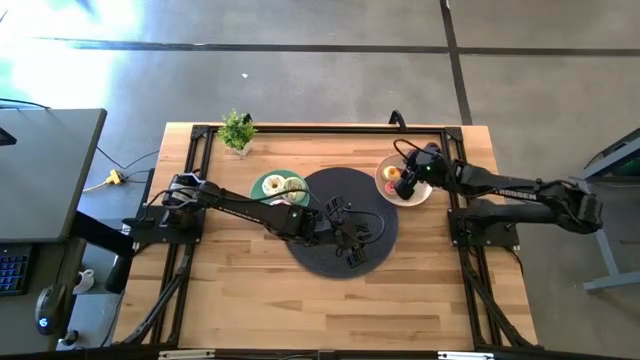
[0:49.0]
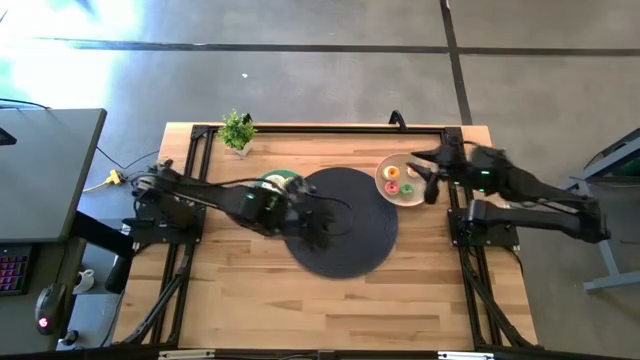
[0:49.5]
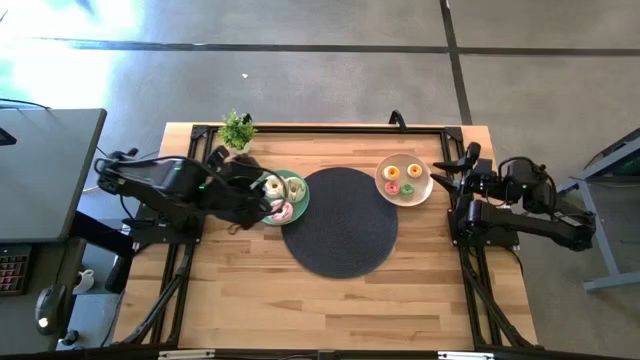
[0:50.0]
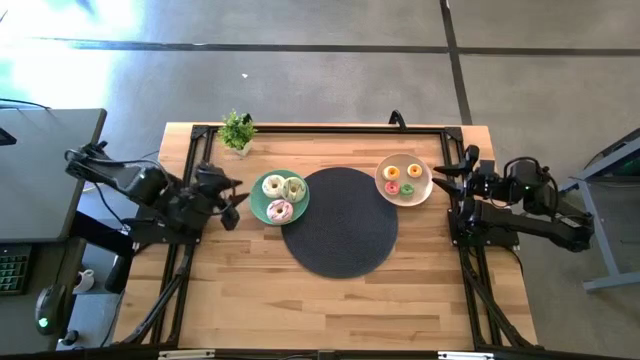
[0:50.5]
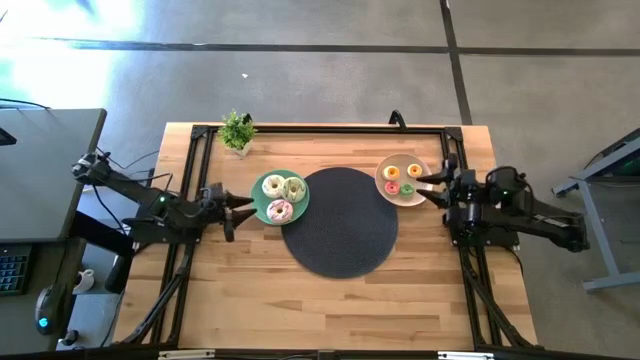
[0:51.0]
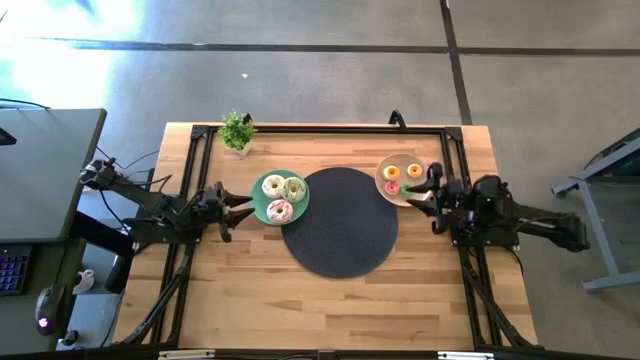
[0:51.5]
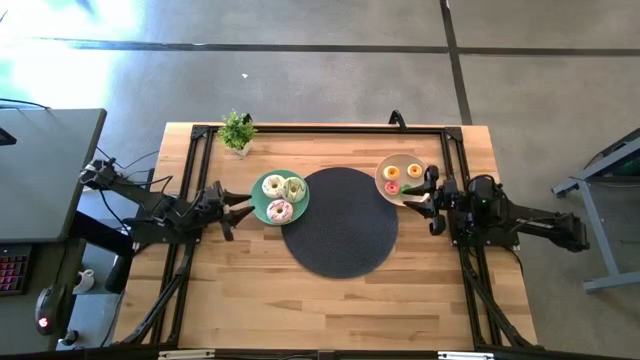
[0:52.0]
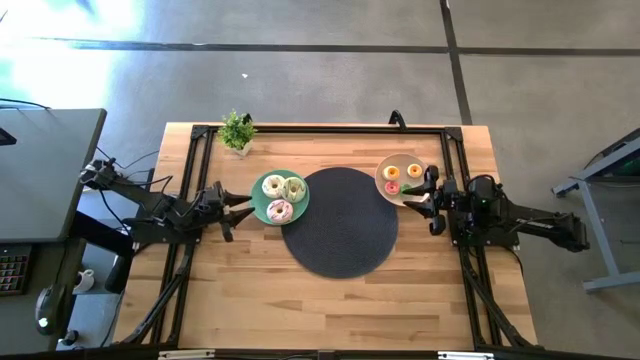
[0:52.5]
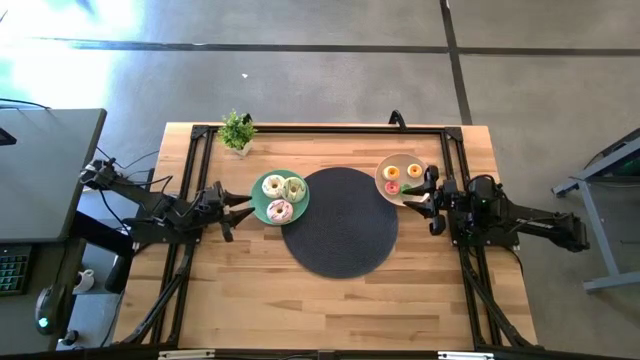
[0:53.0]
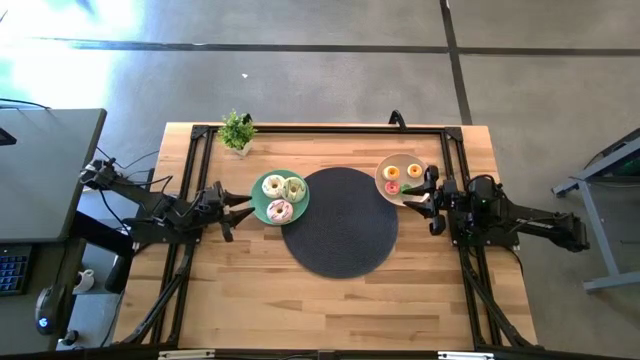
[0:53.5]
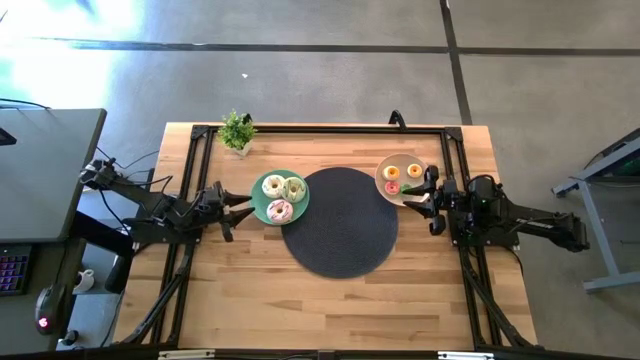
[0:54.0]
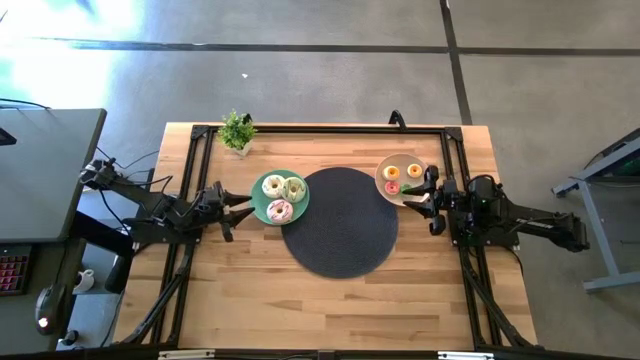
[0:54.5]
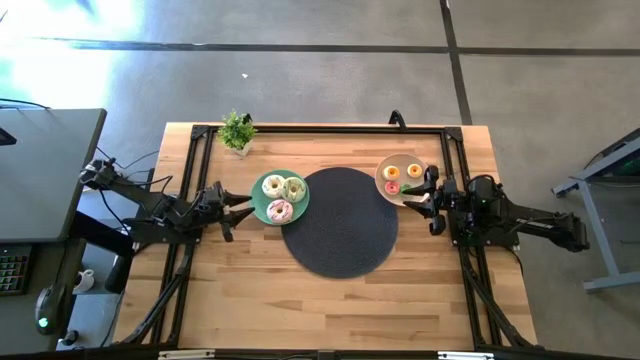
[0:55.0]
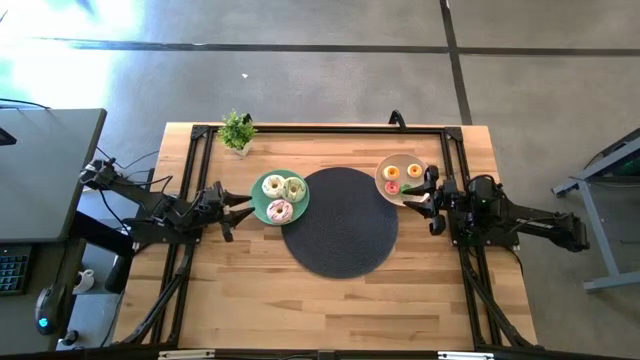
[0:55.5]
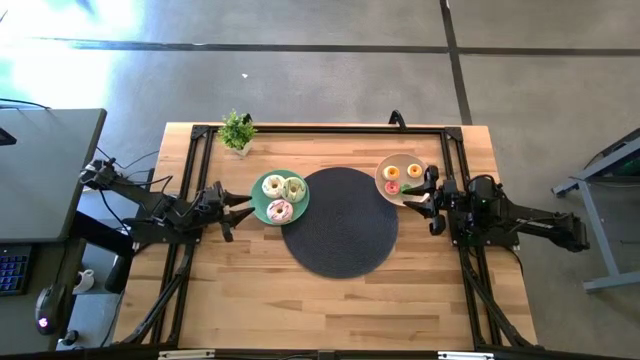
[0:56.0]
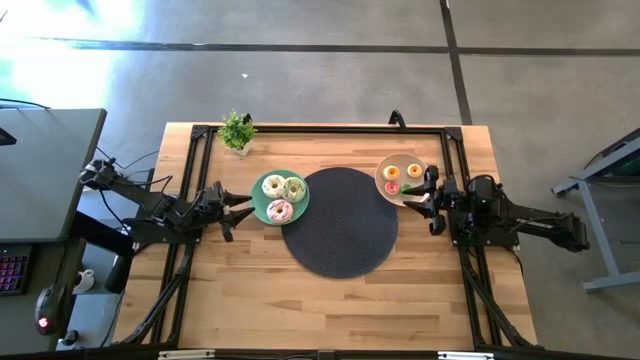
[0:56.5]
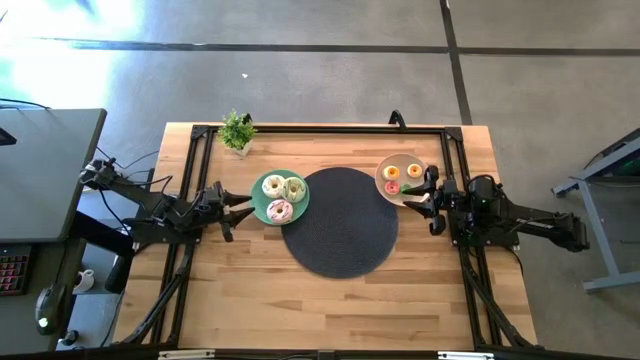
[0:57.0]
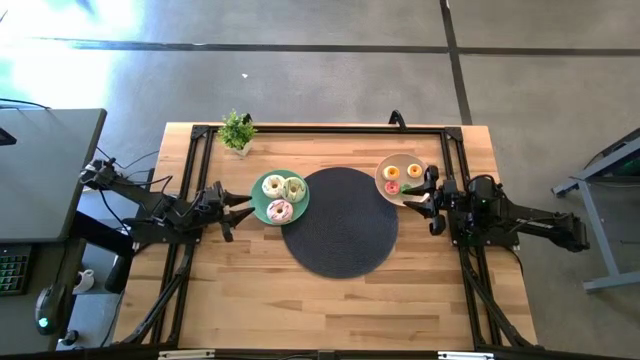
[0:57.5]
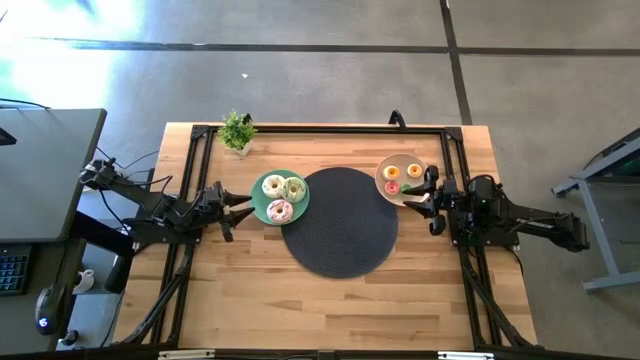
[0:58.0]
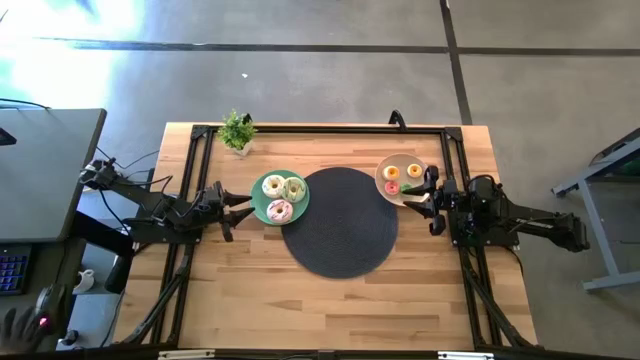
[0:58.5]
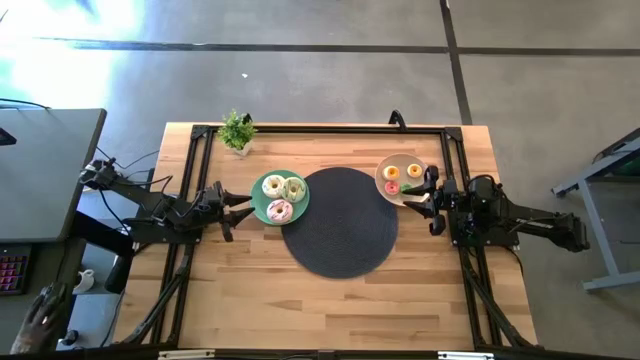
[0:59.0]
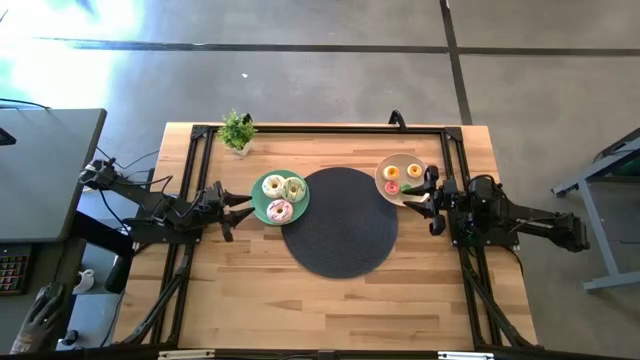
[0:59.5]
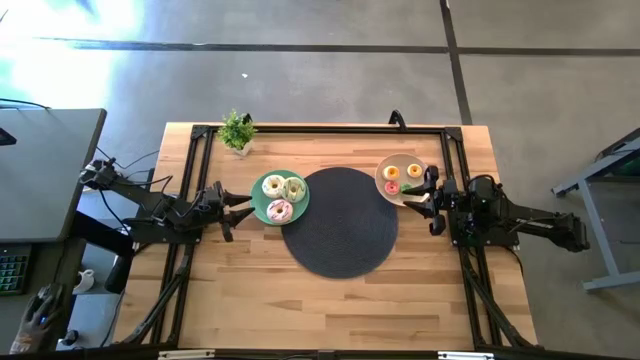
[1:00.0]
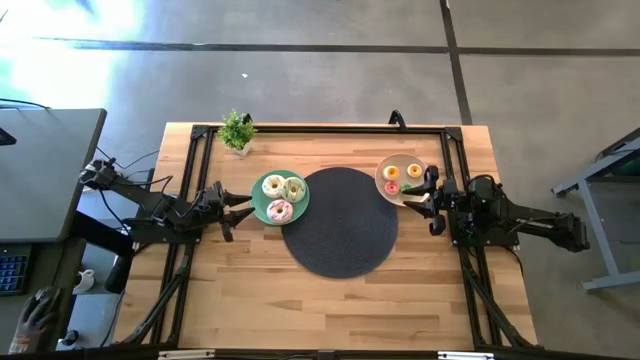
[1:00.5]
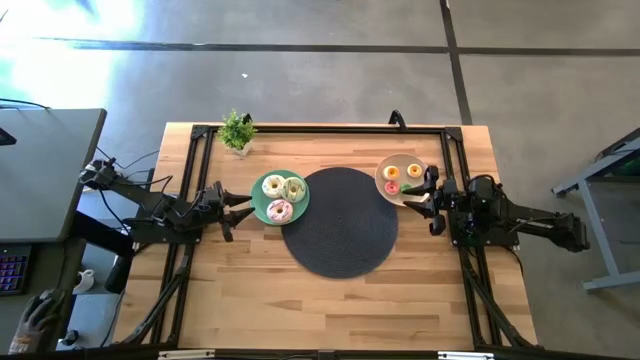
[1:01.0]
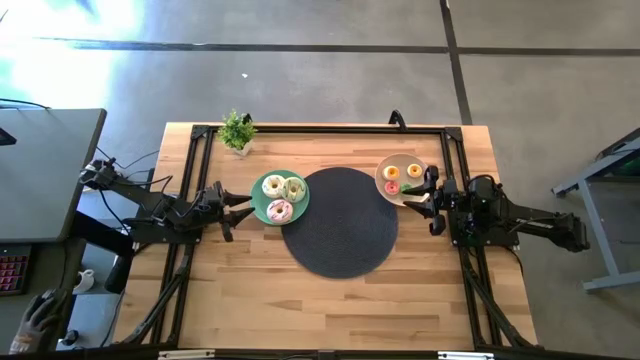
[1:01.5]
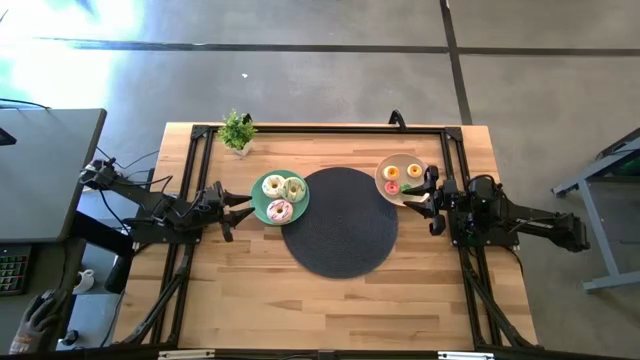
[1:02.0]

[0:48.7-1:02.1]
Task: Pick & Place donuts
Return to Home Position

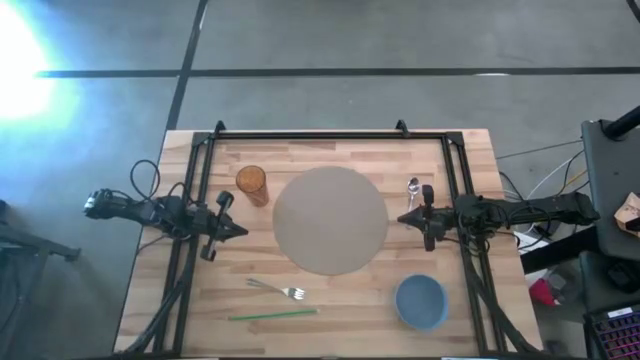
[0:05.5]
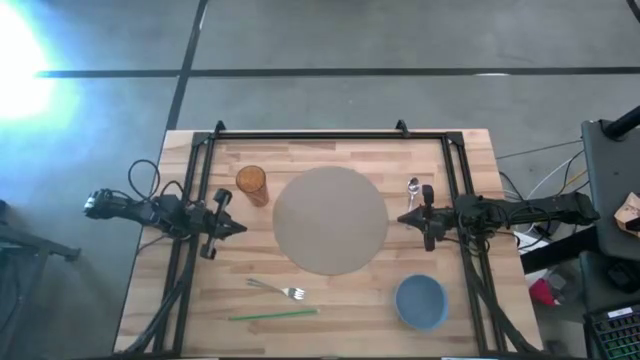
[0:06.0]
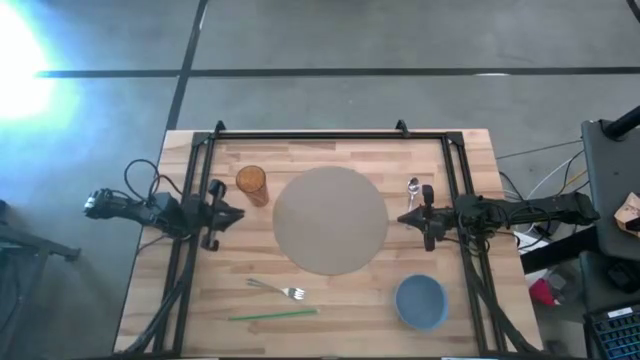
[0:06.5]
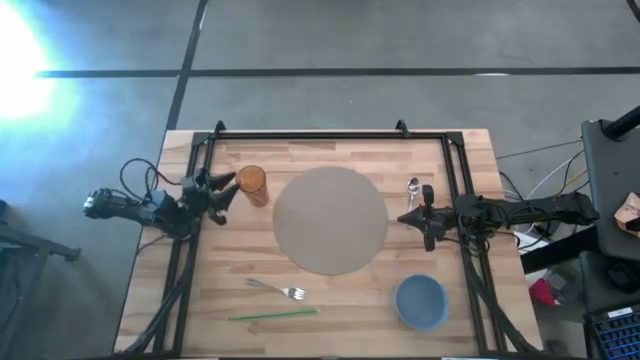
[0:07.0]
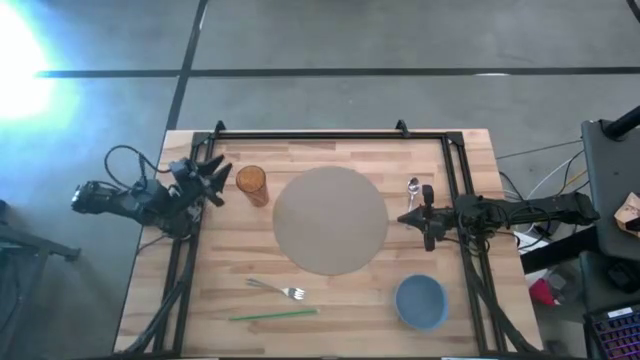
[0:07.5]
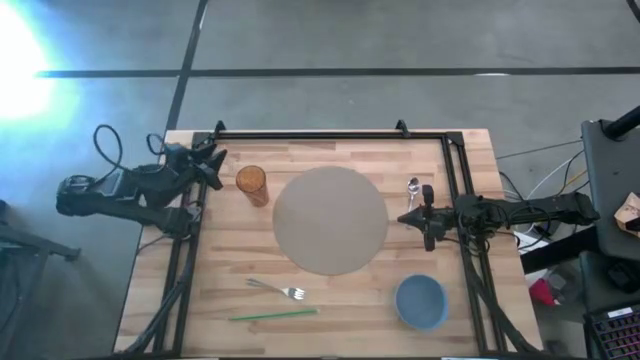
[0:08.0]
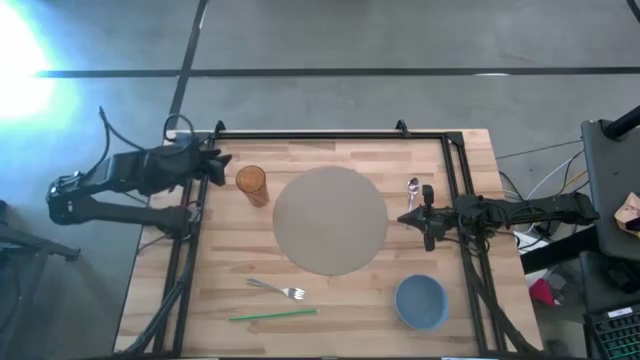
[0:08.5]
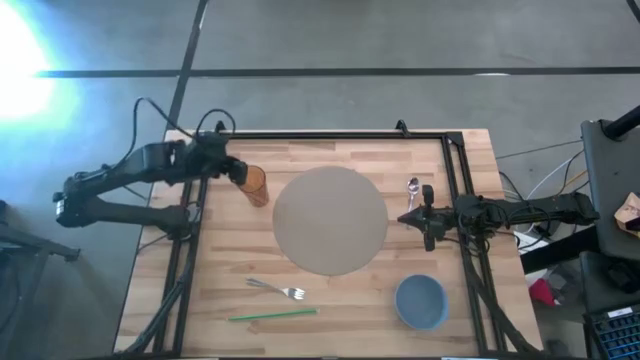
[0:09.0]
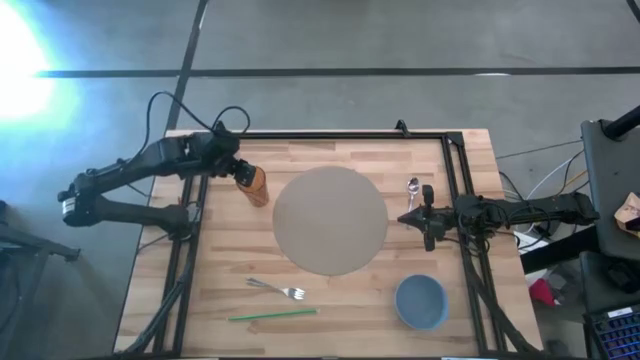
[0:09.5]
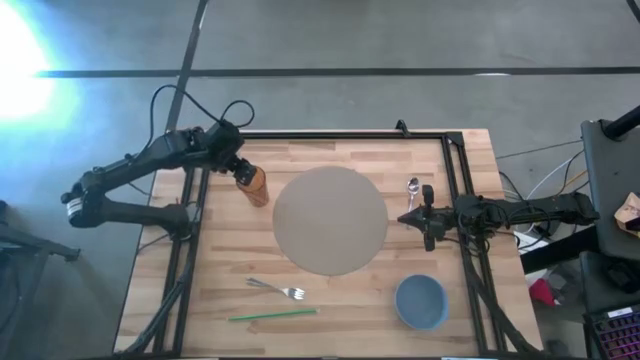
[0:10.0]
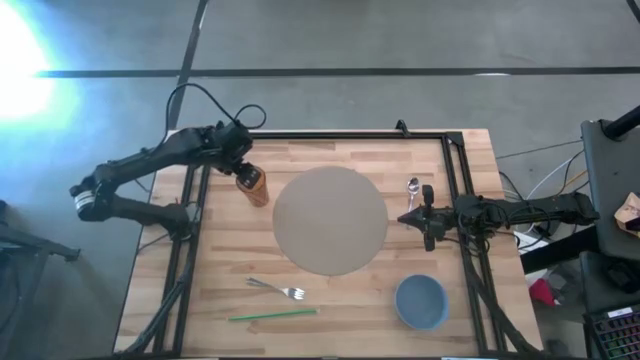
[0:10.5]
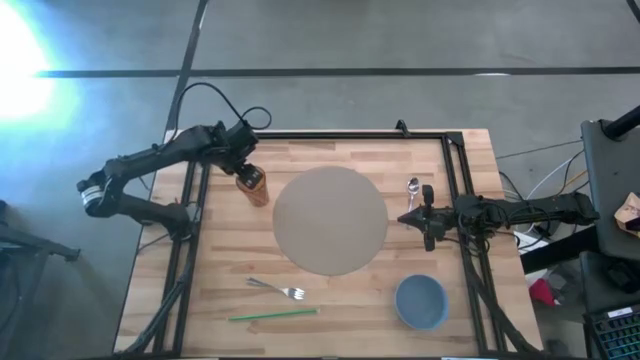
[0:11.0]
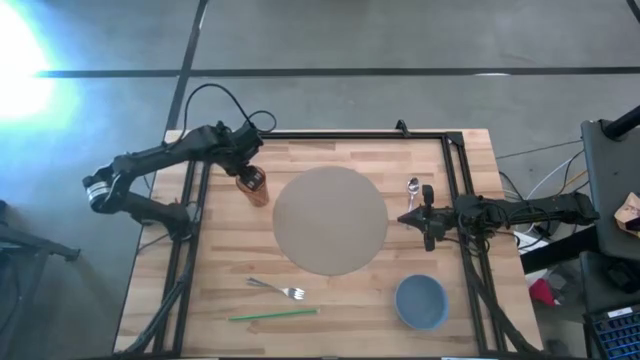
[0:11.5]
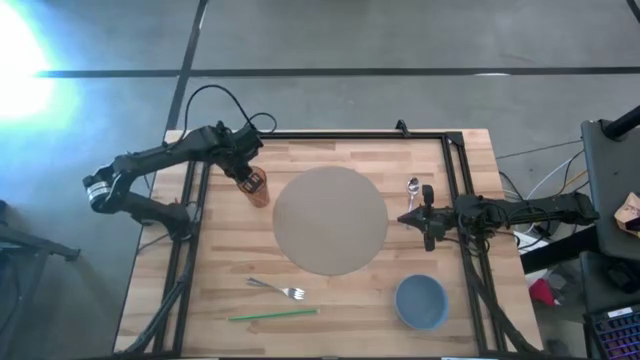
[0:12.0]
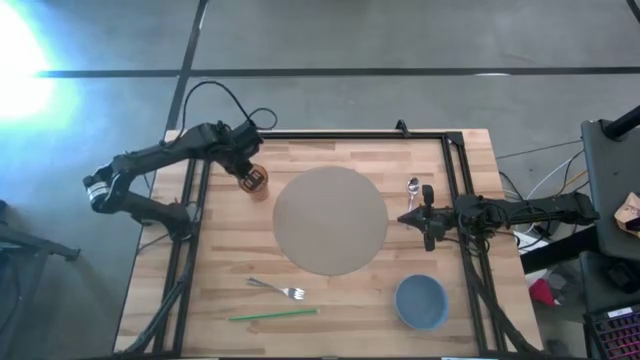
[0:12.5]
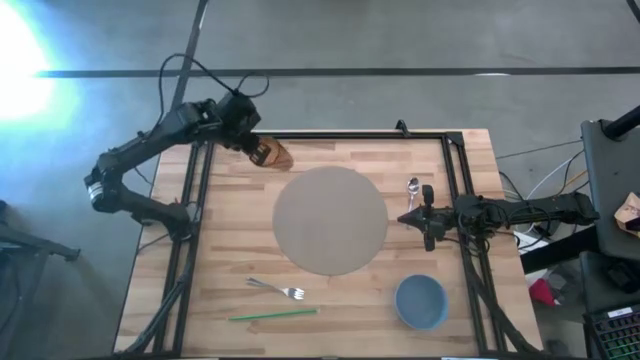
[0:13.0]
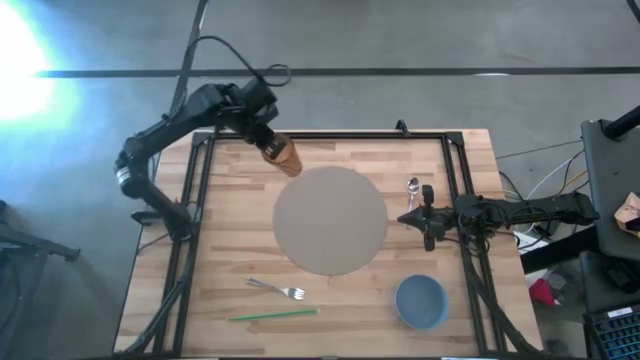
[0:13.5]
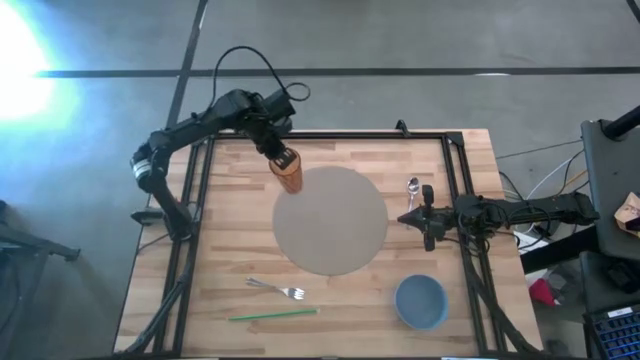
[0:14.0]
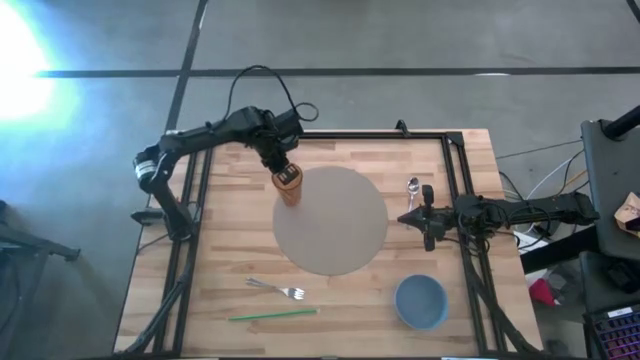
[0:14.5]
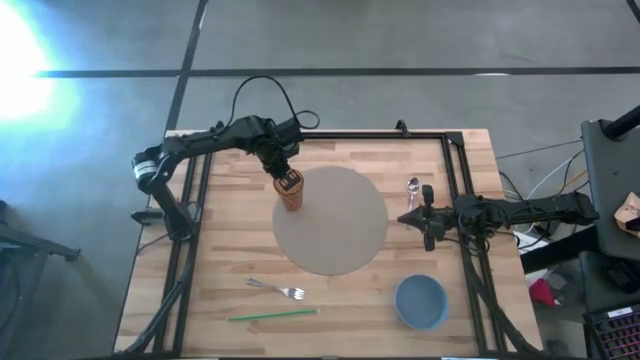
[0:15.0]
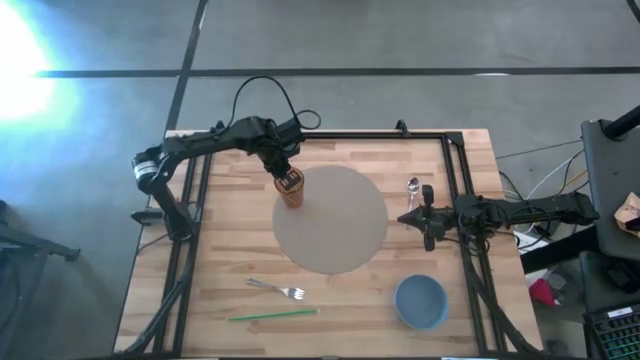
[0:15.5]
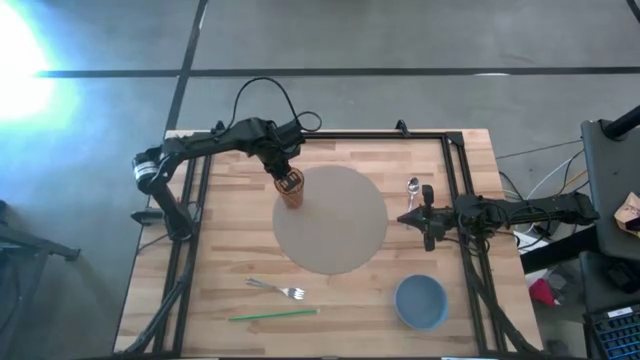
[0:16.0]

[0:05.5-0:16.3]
Task: Pick & Place Utensil
Put the cup on the top left of the mat
